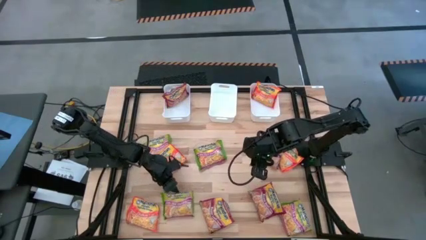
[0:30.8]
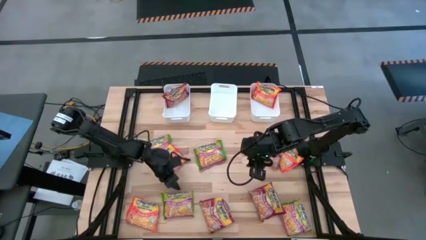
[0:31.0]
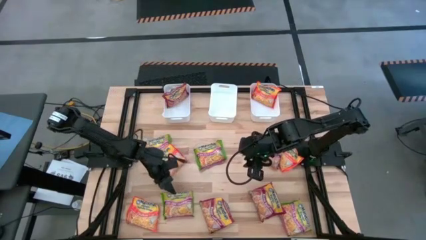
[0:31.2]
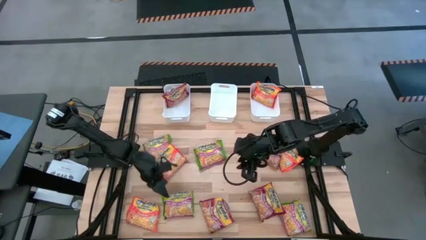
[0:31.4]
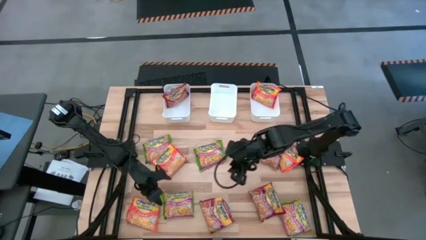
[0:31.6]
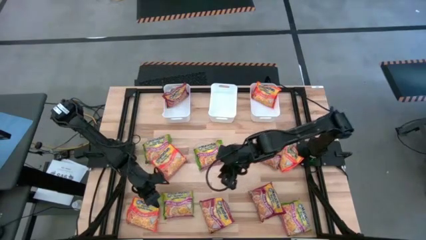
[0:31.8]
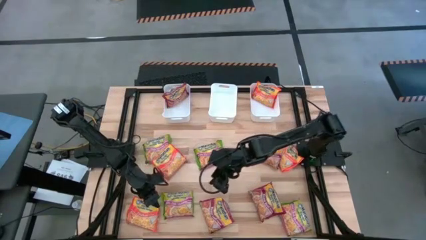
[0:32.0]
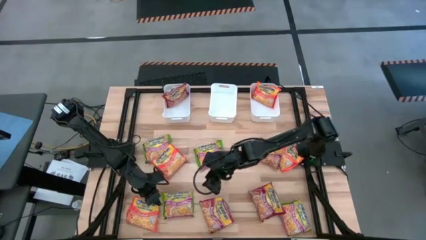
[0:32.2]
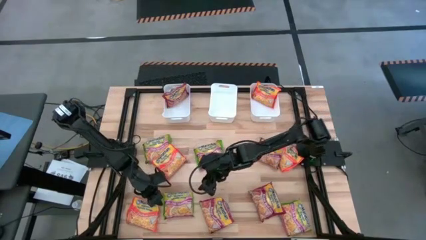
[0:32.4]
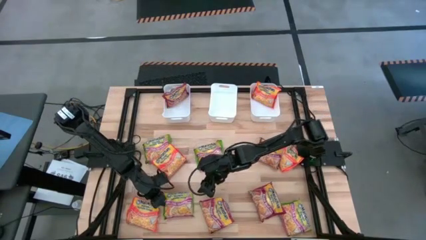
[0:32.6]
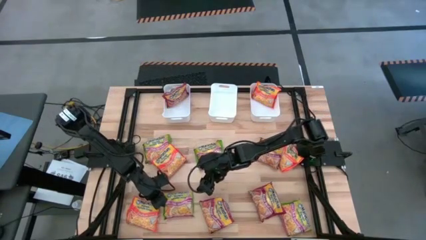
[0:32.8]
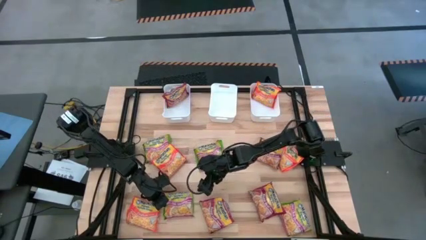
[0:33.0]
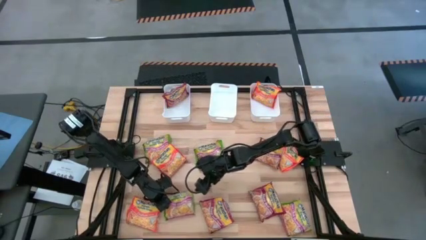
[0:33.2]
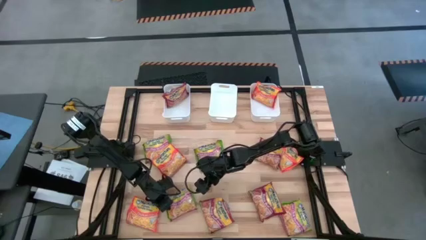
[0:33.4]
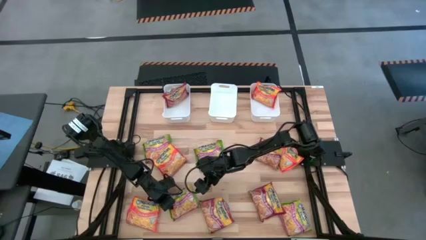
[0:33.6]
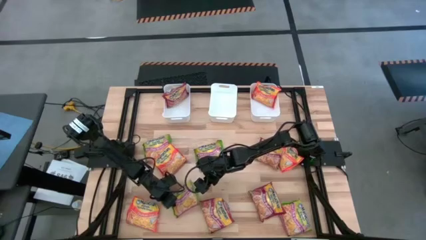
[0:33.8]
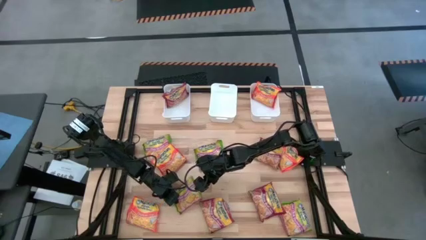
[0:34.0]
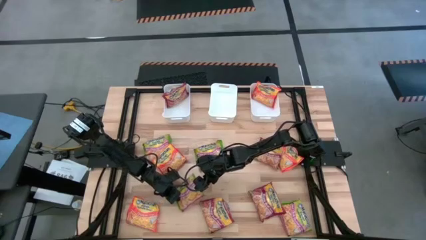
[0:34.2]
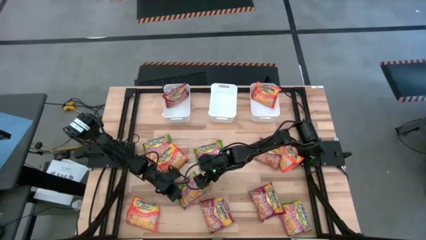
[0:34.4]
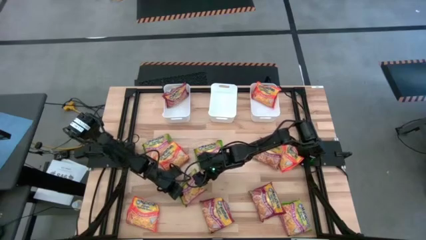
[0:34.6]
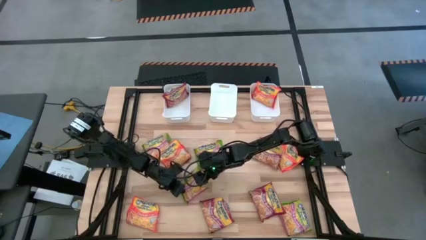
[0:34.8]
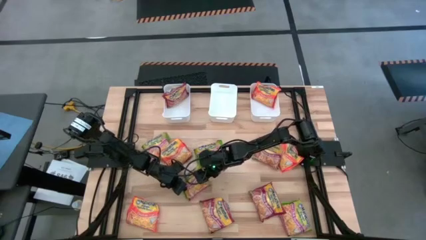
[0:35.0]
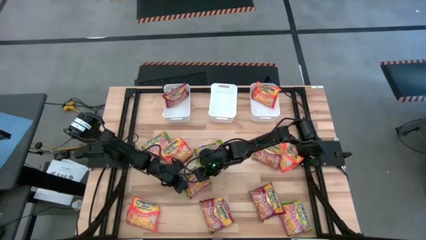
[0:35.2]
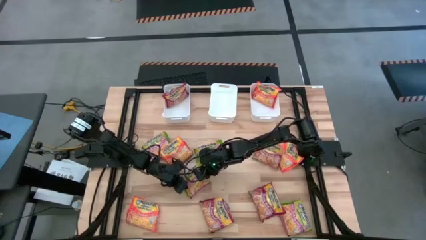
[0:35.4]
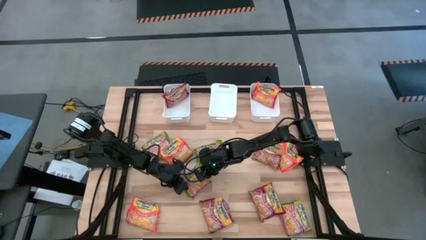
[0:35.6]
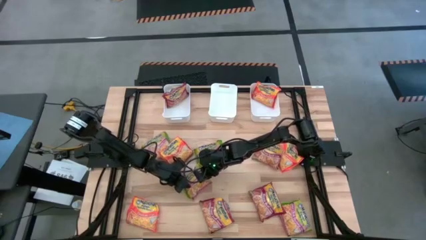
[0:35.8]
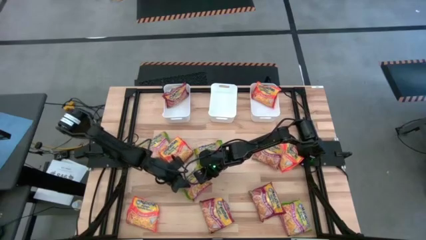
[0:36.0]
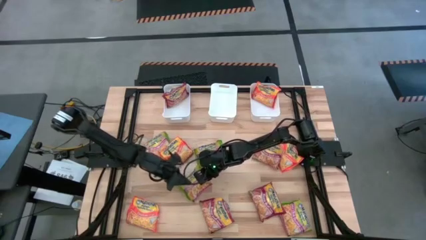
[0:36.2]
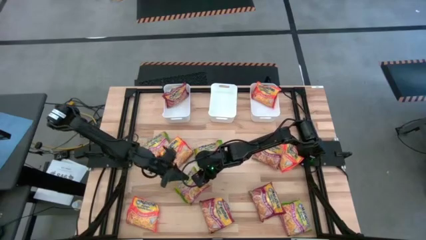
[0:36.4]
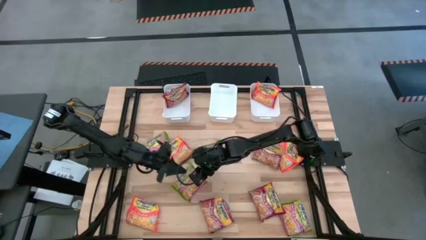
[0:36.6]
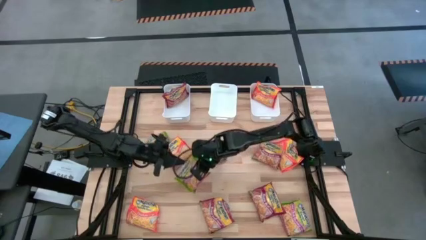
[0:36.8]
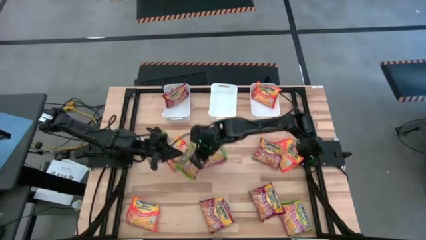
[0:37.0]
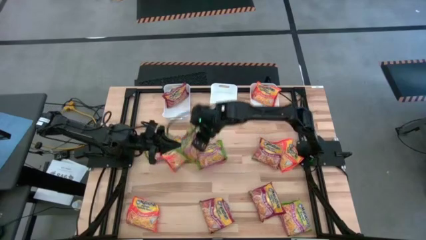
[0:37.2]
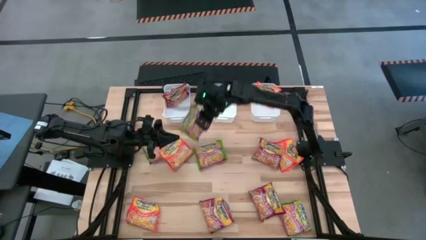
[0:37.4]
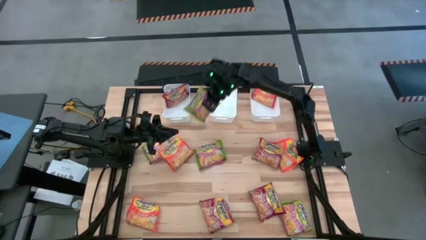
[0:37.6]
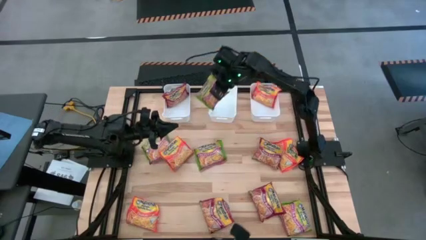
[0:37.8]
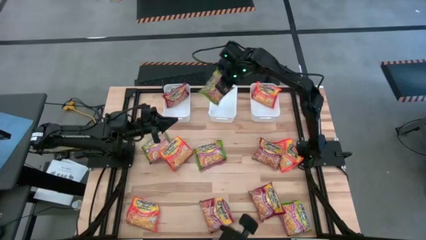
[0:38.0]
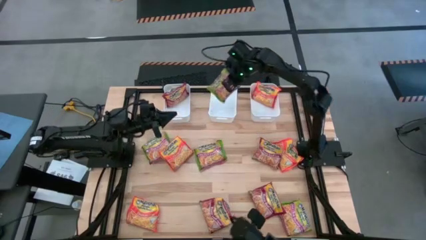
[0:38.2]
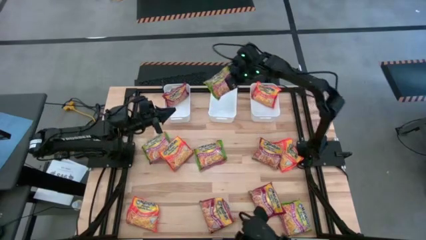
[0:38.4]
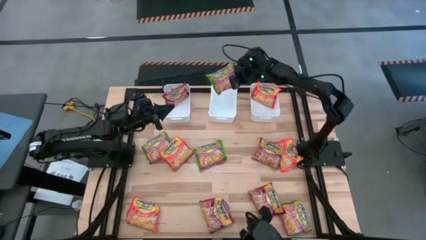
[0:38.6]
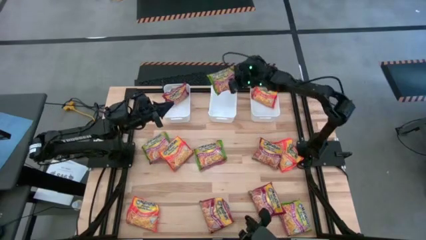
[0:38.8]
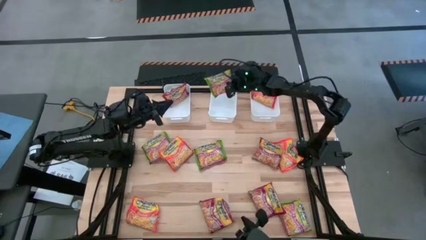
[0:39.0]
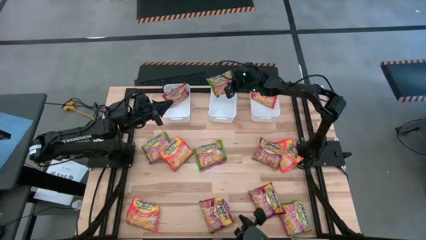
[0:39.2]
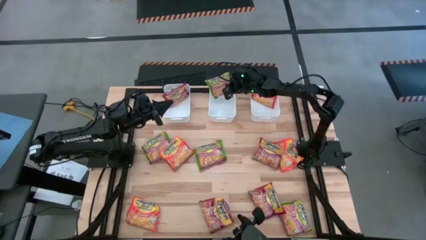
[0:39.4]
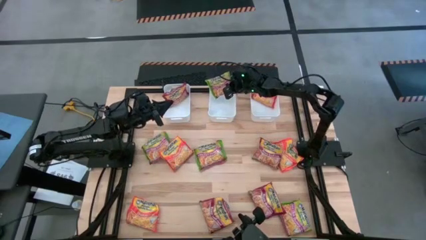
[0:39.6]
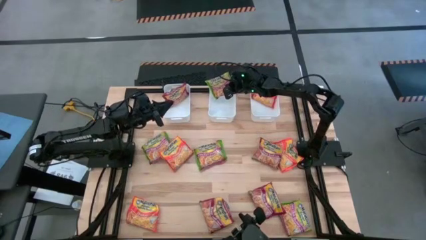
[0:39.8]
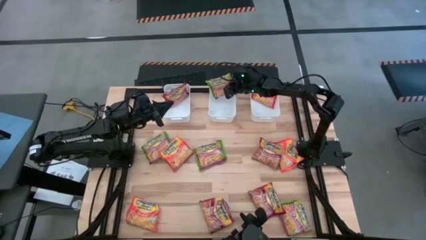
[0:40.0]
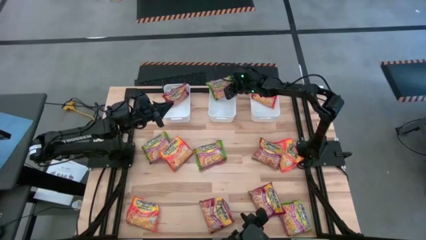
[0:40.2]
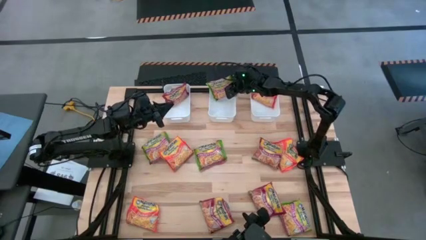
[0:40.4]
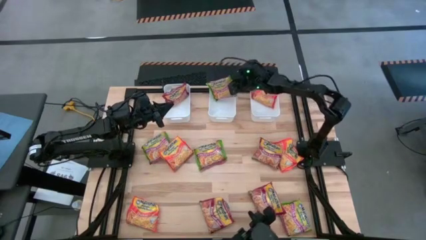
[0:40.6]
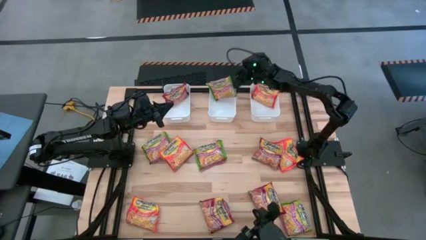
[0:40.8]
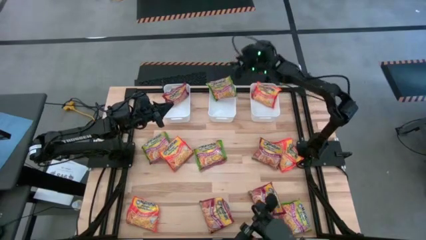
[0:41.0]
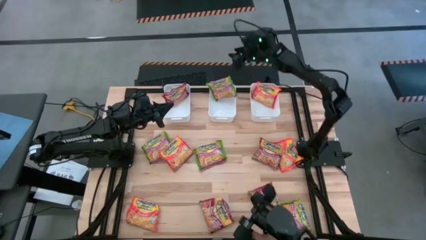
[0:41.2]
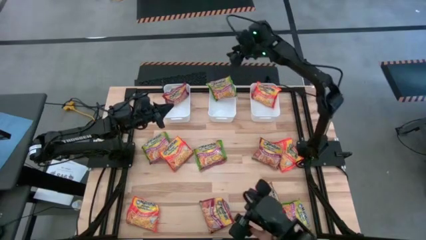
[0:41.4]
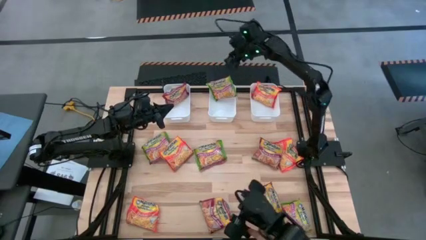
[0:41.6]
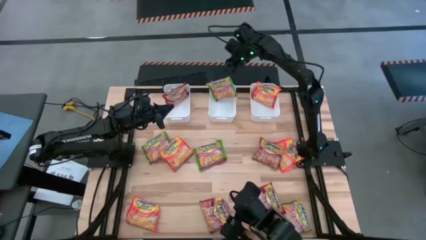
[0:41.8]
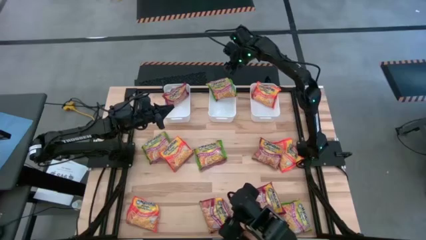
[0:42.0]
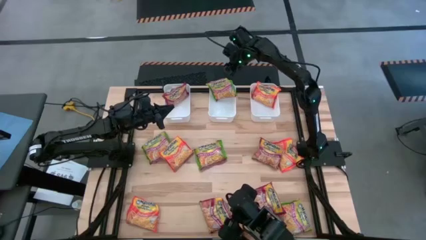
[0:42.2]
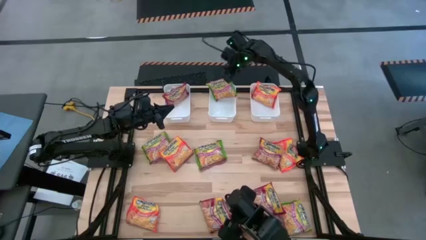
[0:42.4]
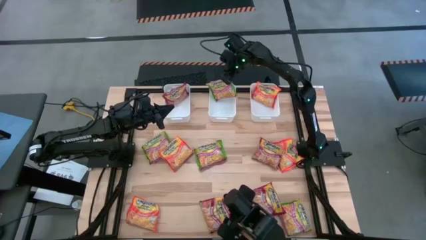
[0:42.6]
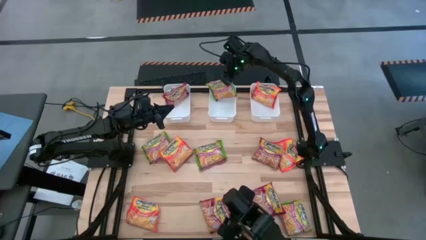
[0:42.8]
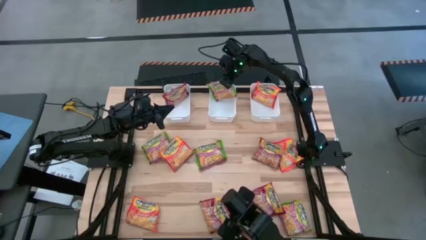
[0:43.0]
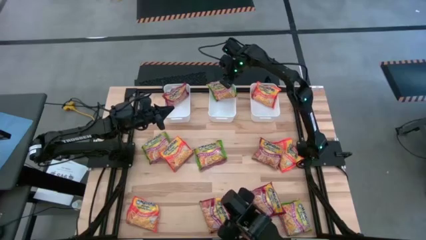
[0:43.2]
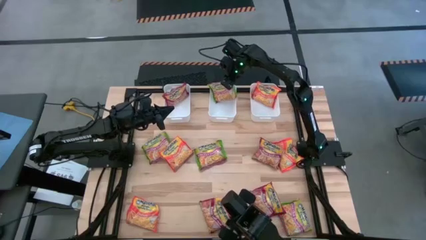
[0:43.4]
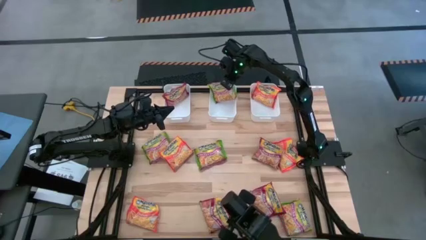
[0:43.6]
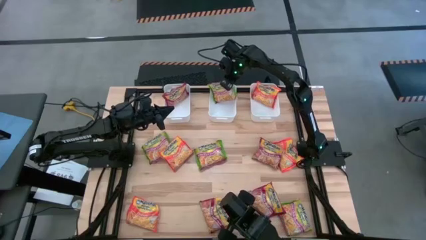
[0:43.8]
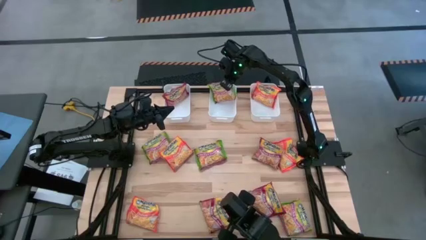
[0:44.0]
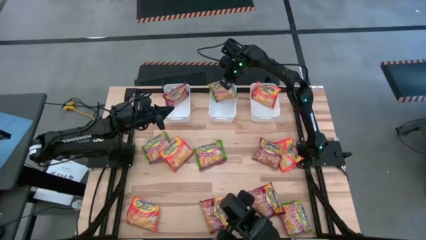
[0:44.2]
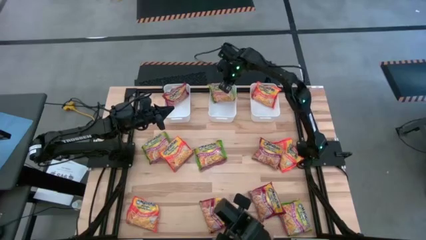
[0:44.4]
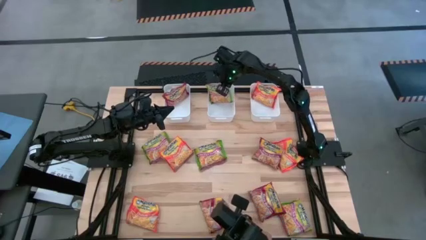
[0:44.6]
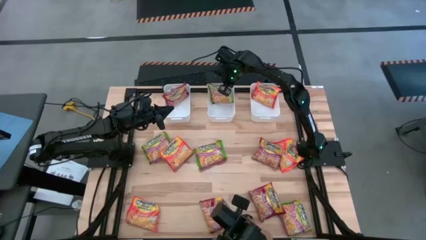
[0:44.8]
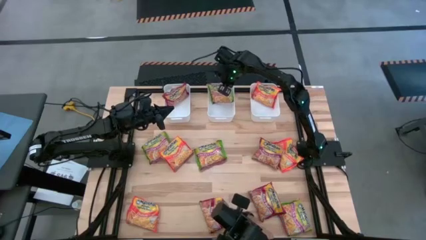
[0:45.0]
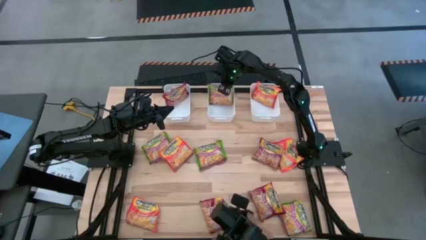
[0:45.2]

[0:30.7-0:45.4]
Task: Sort Maruchan noodles
Put the green noodle pack into the middle white bin

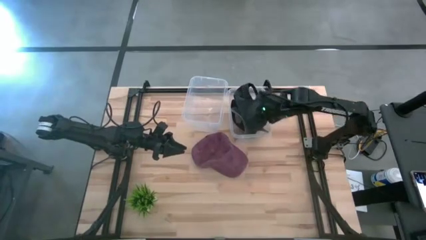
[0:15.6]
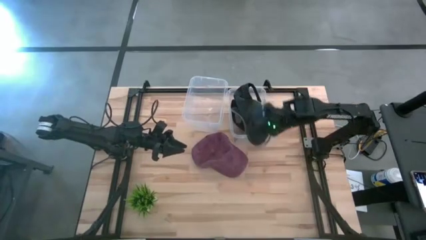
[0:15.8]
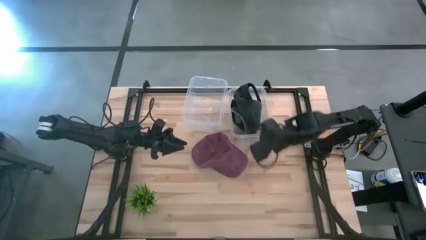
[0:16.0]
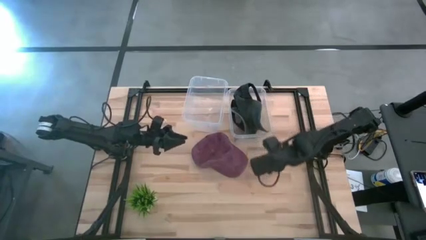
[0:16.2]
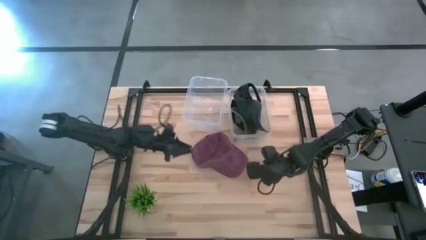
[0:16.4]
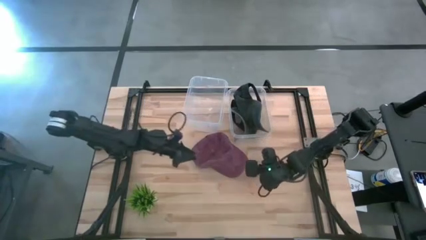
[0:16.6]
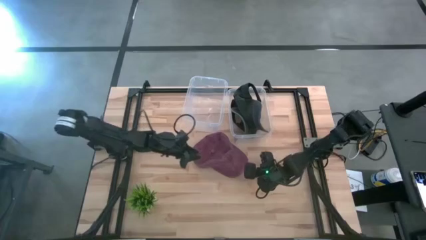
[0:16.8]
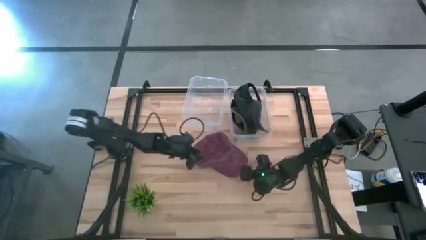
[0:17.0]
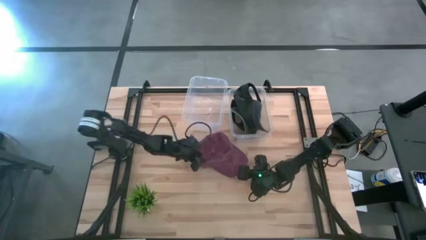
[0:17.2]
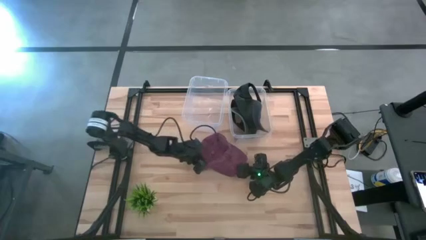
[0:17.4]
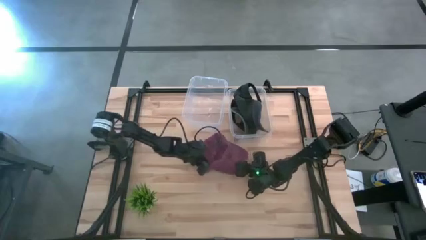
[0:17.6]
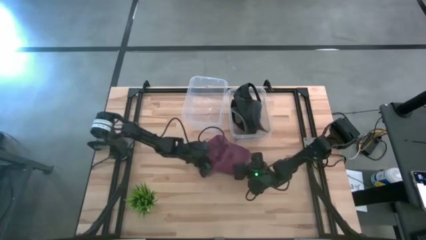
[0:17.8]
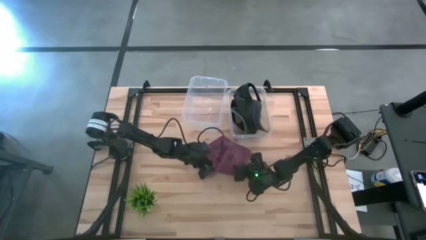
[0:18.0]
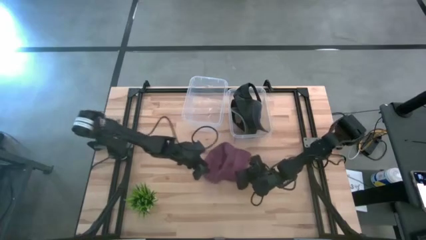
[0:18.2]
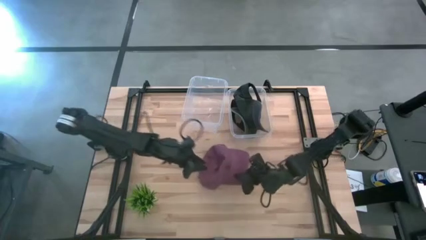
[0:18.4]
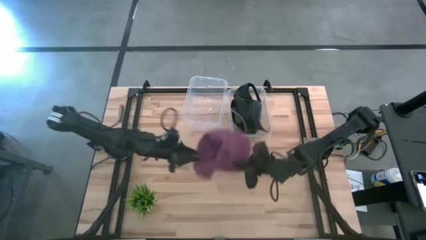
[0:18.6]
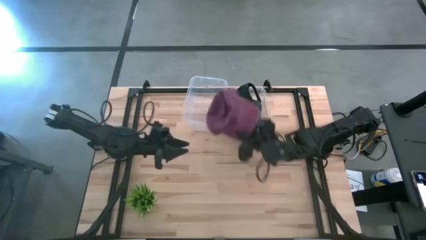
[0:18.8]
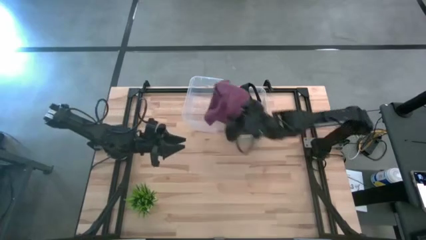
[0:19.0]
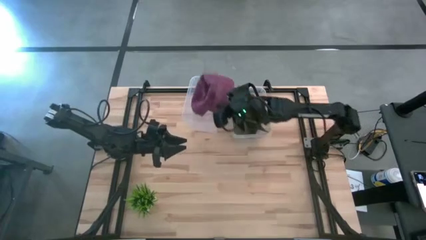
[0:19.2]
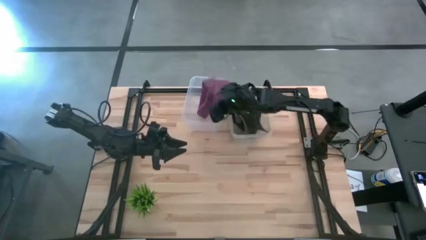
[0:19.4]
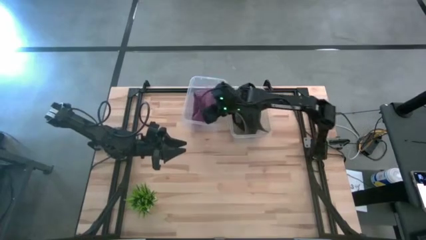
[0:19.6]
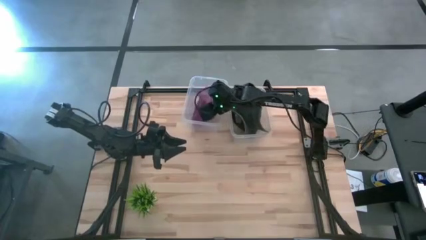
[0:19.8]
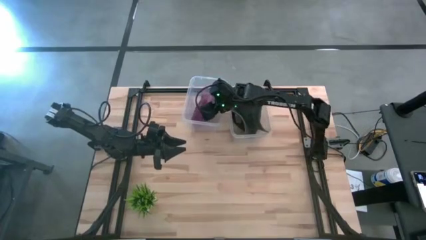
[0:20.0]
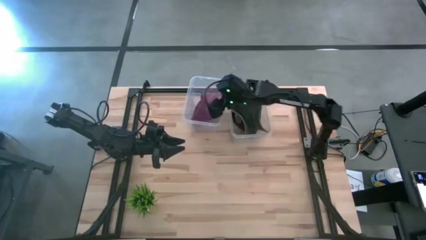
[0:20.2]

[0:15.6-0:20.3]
Task: Pick & Place hat
Put the pink cap into the left transparent bin
